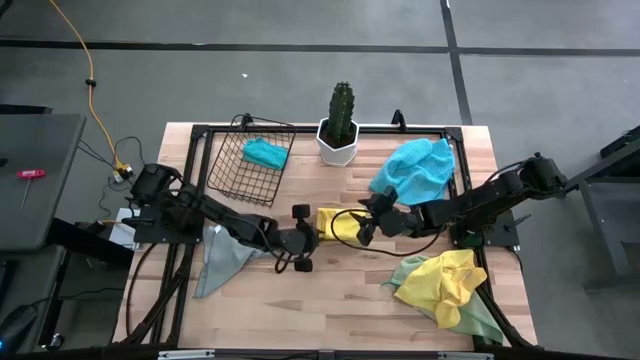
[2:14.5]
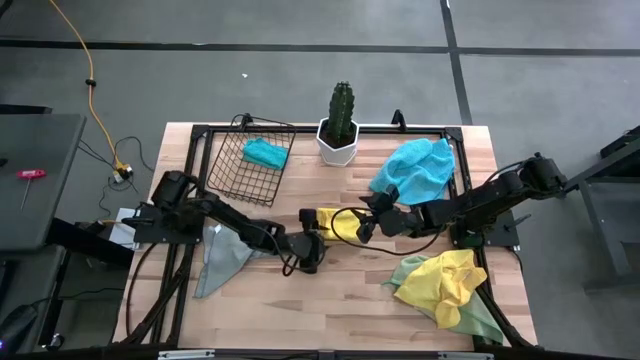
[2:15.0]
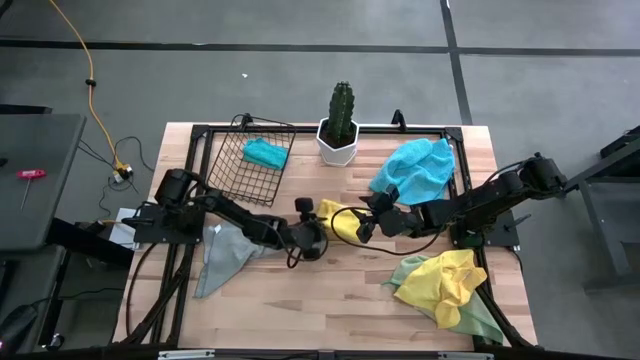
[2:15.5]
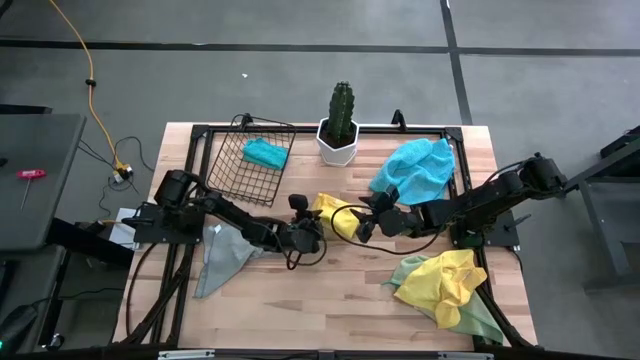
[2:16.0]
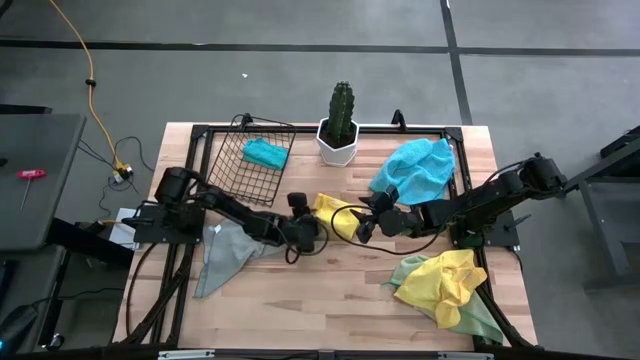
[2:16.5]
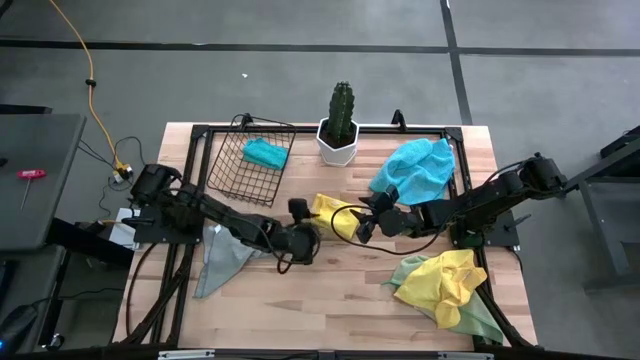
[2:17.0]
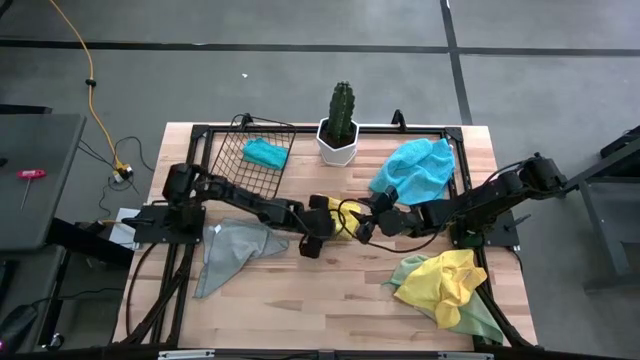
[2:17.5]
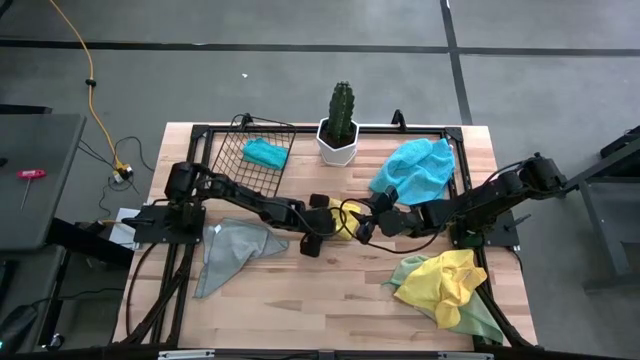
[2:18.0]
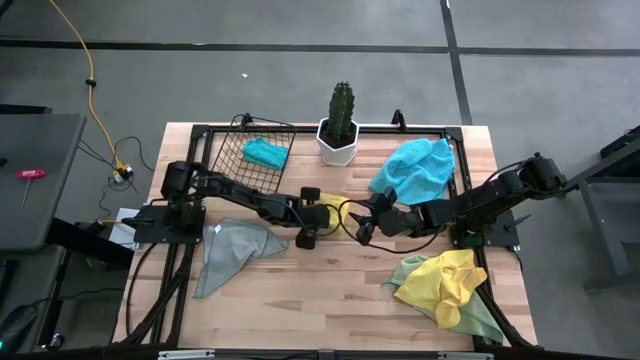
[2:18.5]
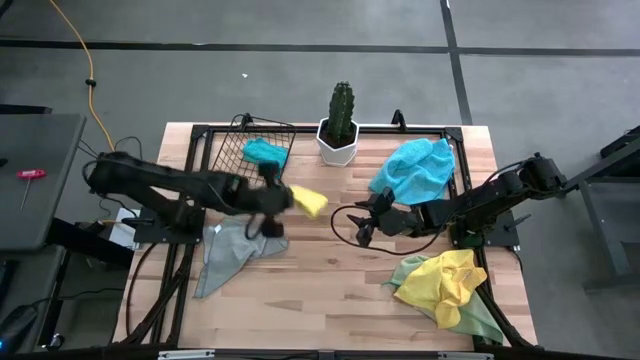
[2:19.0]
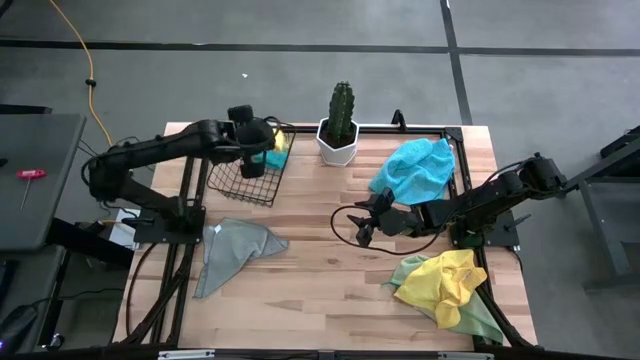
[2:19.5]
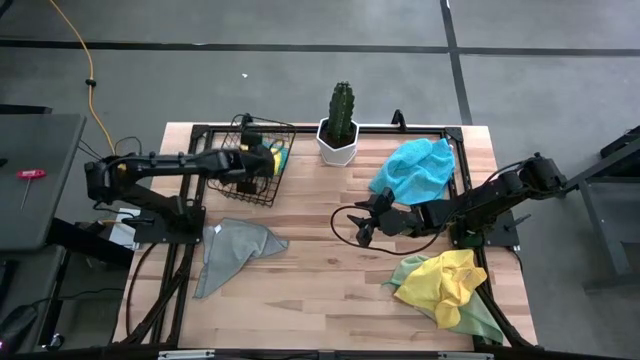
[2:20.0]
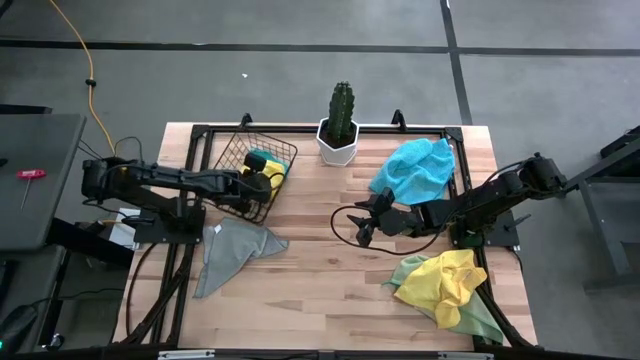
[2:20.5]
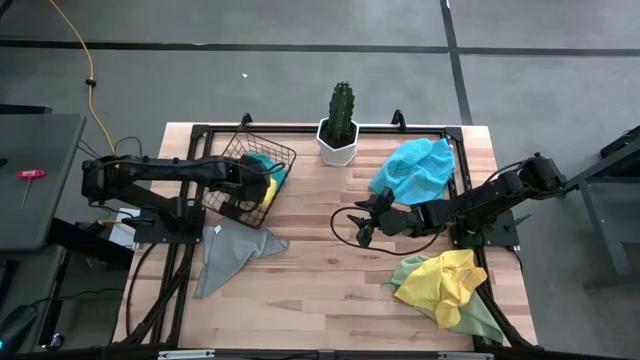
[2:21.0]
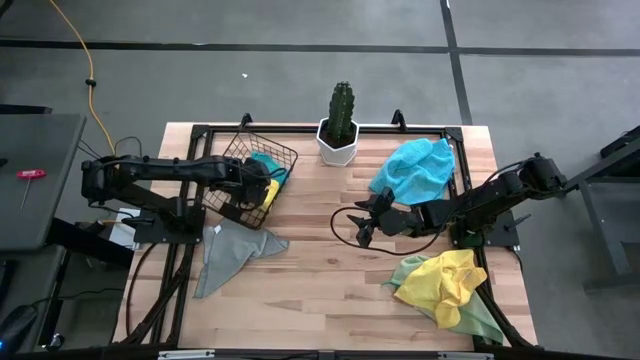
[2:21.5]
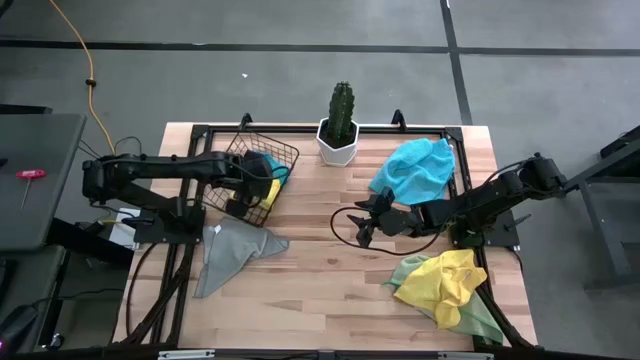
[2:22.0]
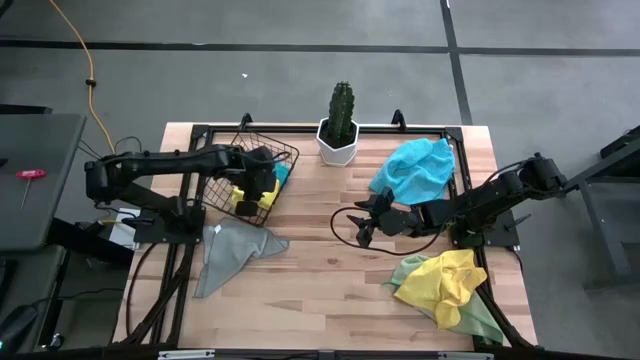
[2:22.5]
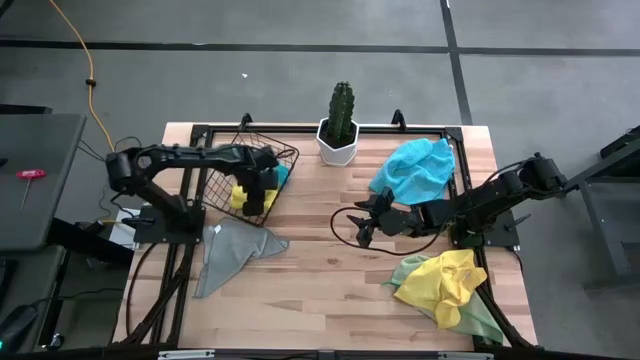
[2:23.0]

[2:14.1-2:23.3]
Task: Fold microfiber towels
Put the folded yellow microfiber towel into the mesh basket

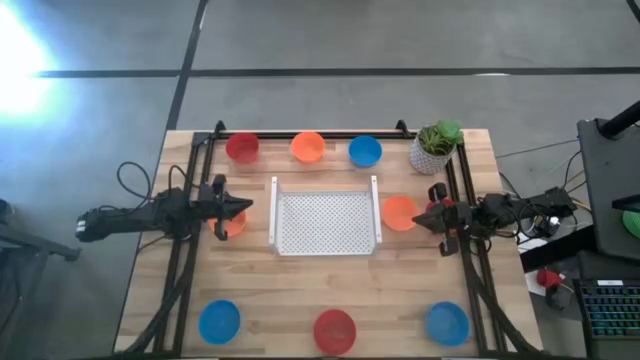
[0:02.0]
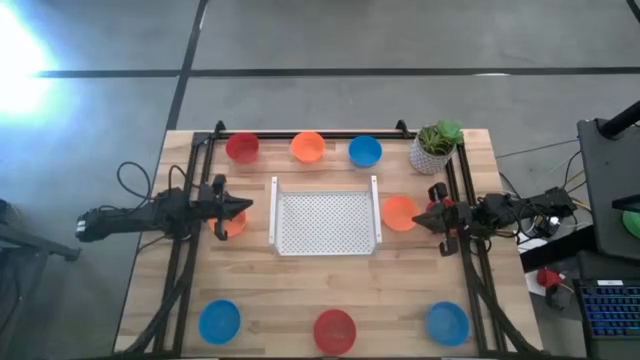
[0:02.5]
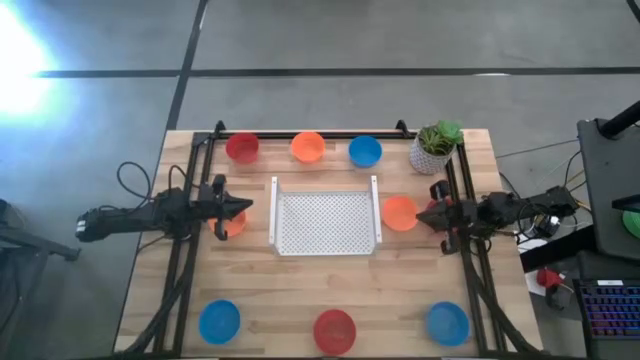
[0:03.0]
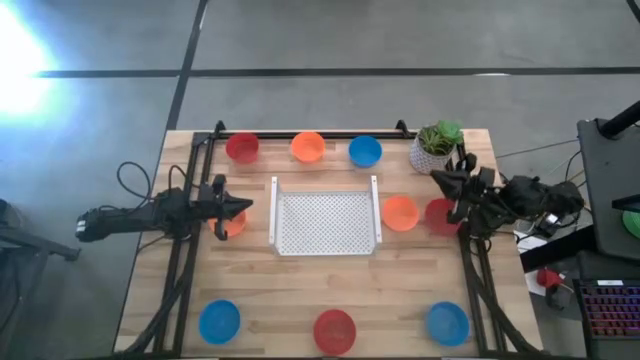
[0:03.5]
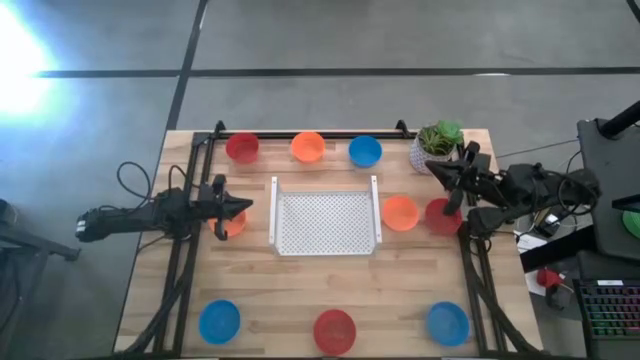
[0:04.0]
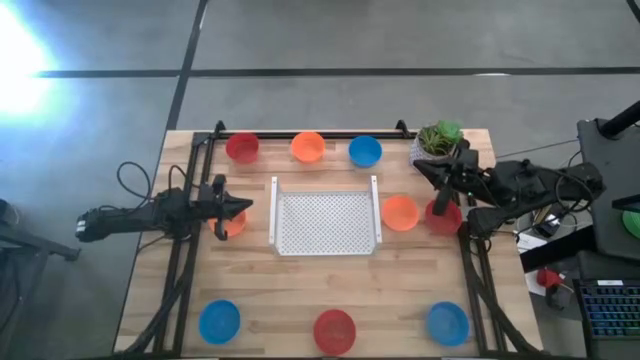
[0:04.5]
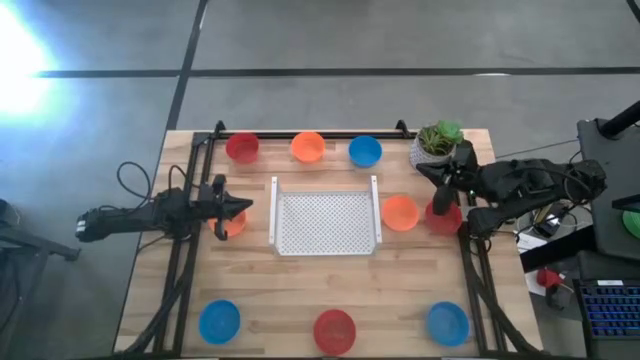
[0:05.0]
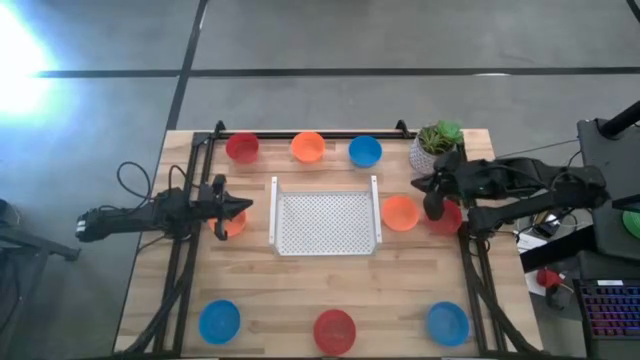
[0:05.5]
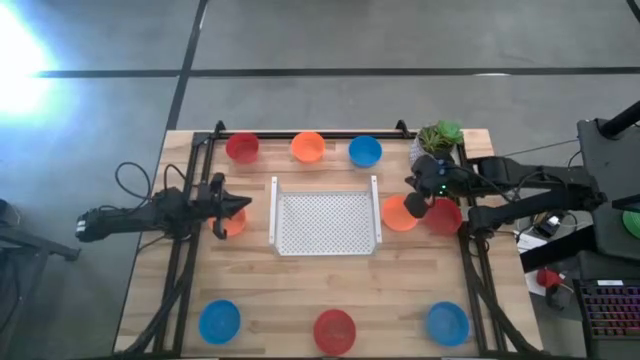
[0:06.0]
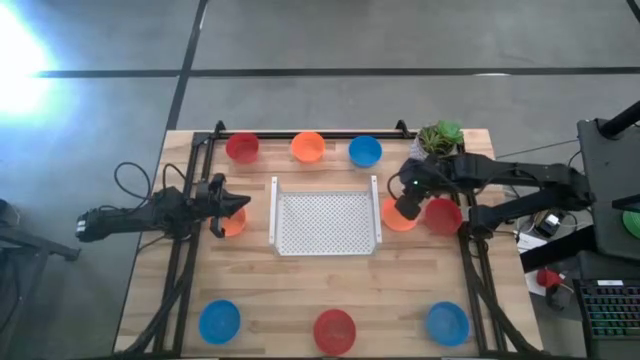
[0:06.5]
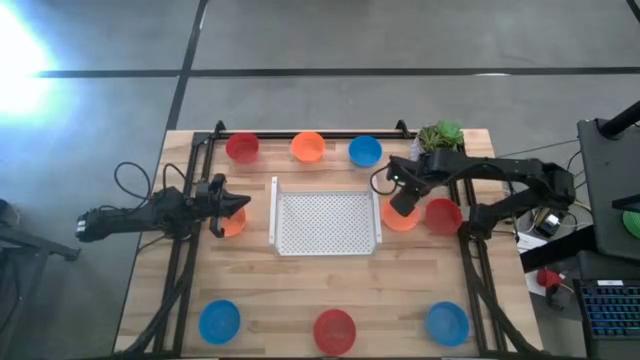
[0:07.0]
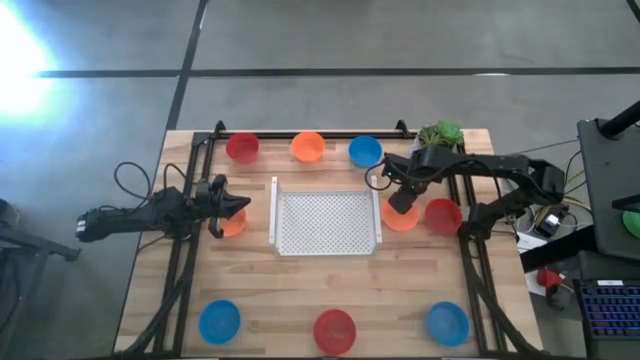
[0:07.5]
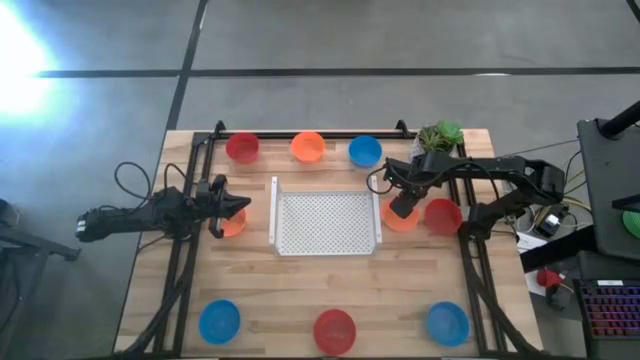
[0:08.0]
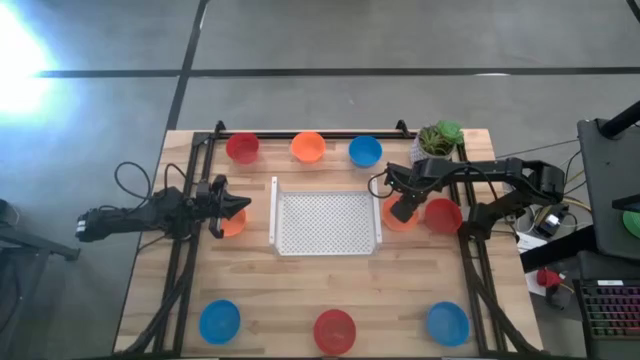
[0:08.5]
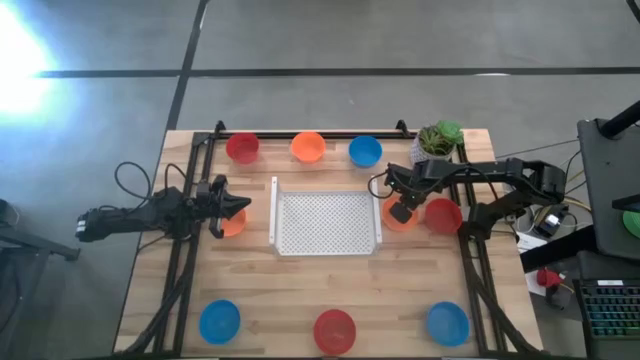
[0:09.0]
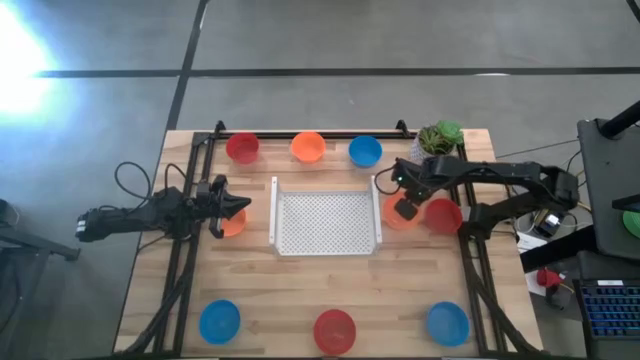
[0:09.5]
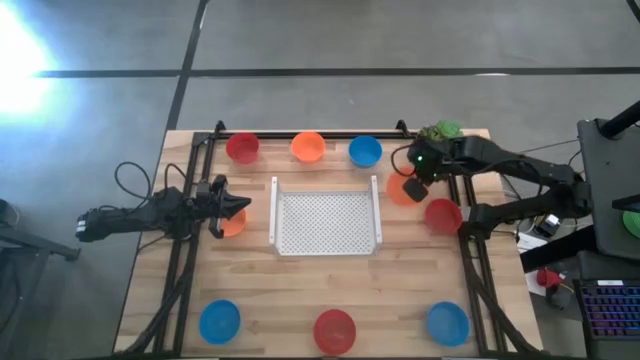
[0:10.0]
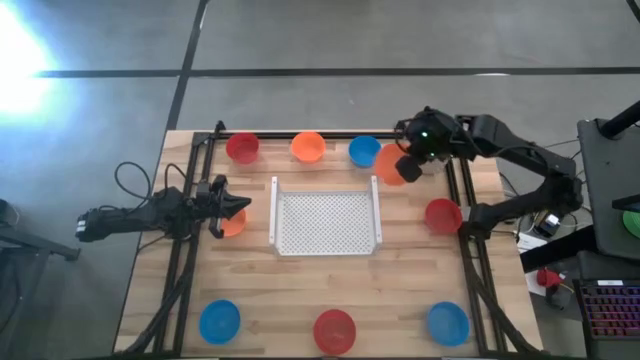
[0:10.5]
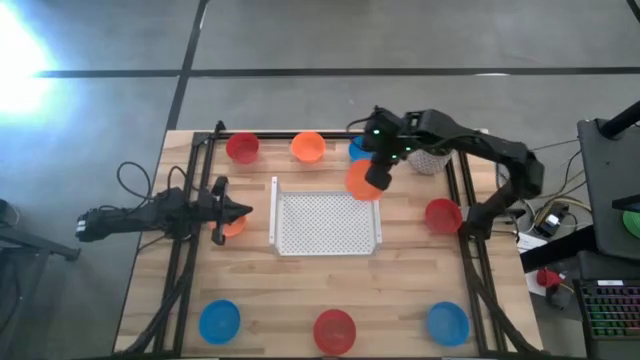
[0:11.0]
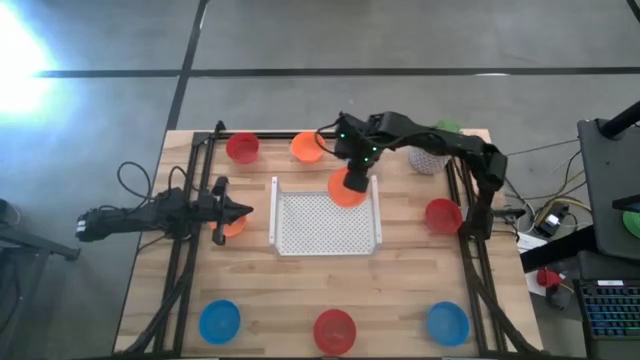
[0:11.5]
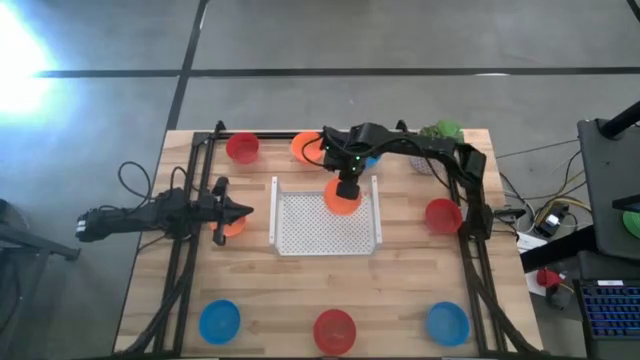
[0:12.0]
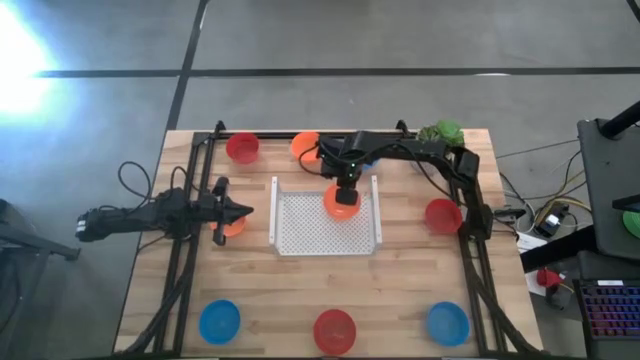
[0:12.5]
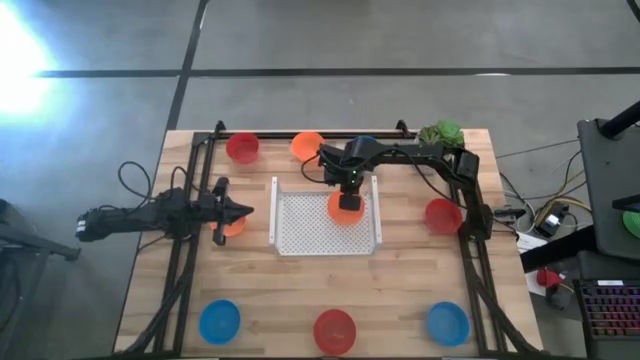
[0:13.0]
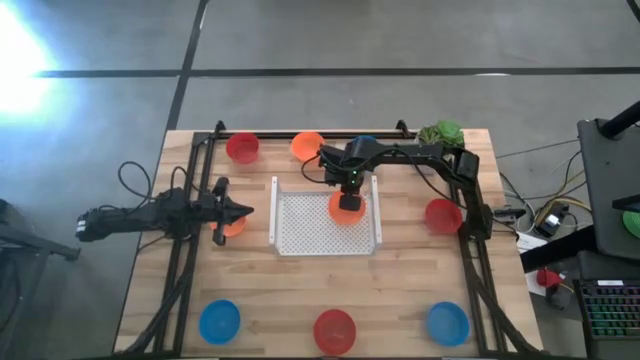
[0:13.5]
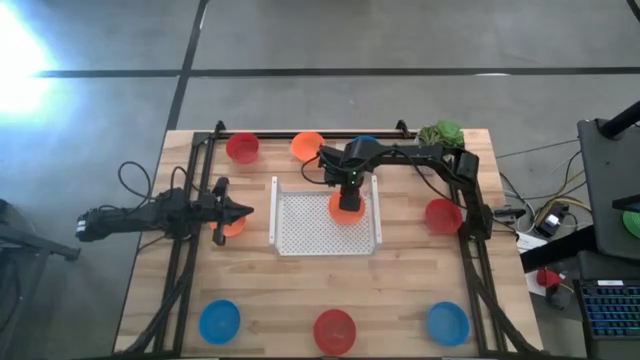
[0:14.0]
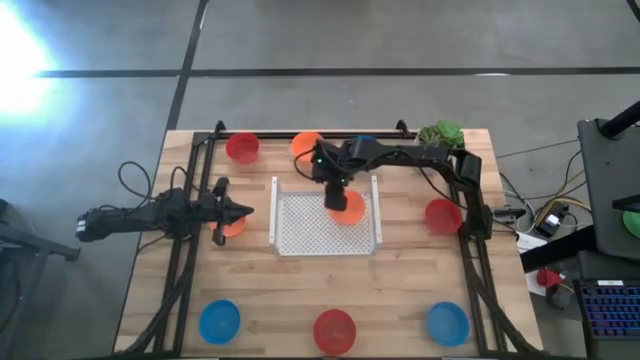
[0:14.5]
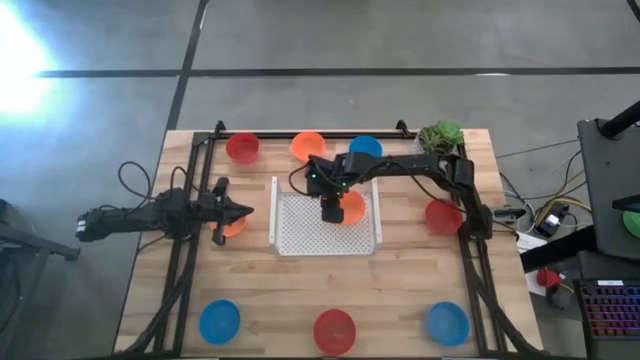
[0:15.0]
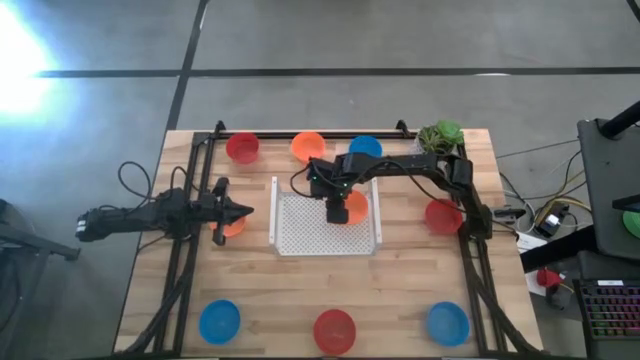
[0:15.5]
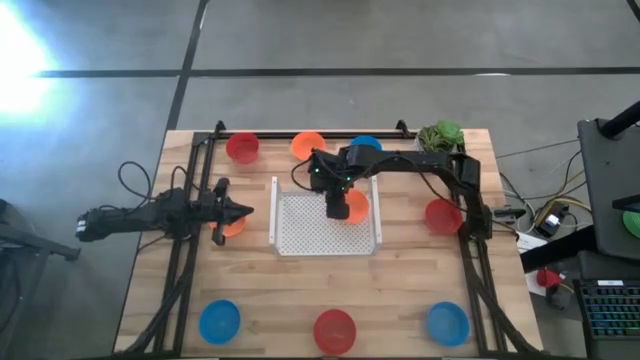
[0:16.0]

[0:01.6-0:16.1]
Task: Pick & Place Mini bowls
Put the bottom right orange bowl on the shelf
